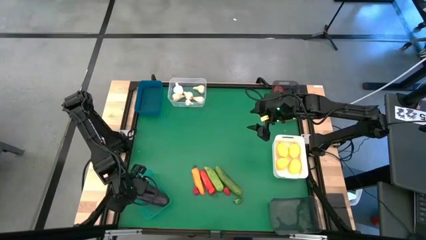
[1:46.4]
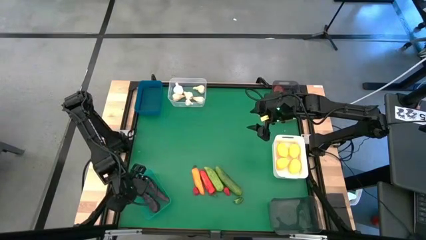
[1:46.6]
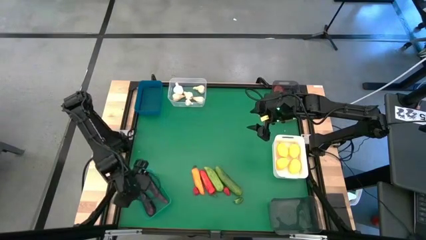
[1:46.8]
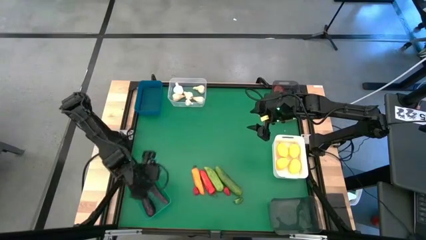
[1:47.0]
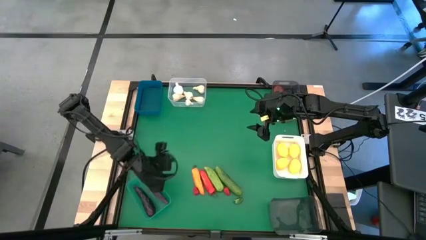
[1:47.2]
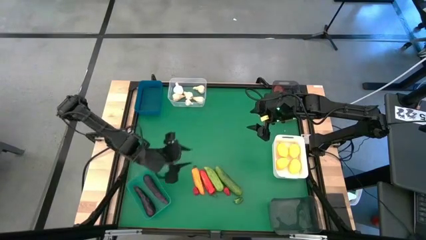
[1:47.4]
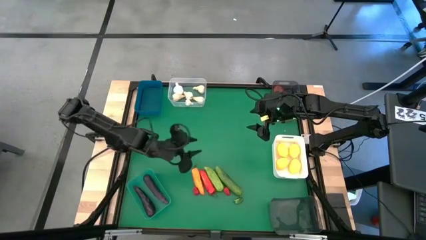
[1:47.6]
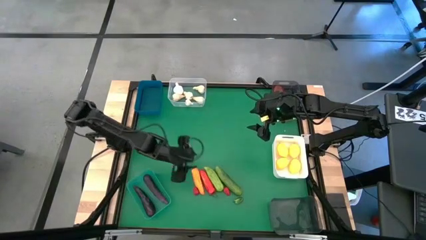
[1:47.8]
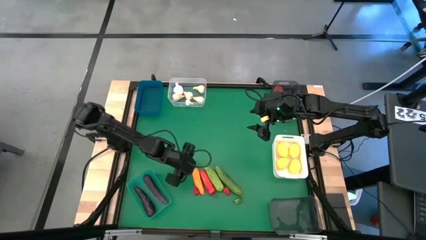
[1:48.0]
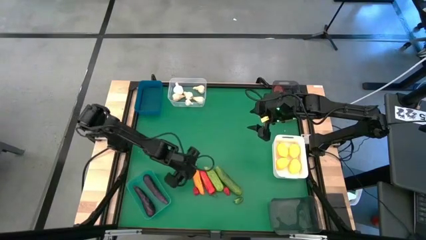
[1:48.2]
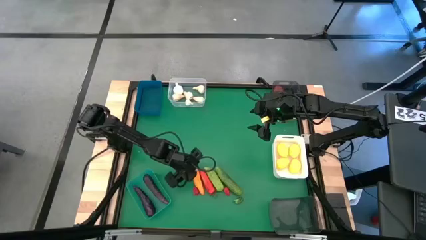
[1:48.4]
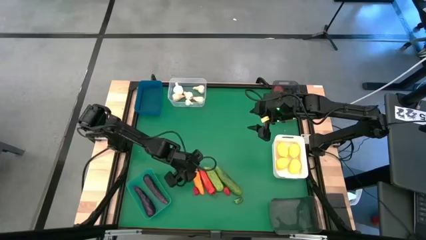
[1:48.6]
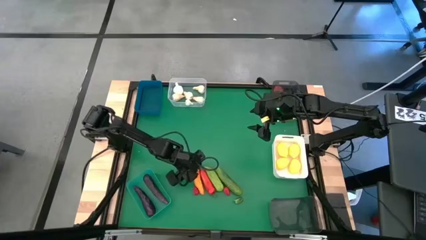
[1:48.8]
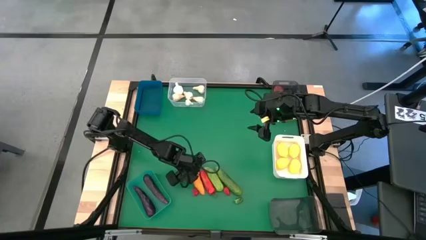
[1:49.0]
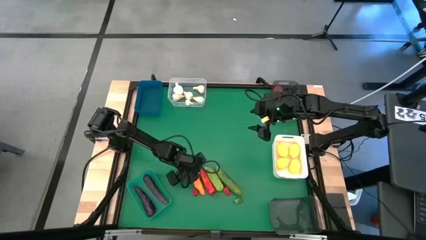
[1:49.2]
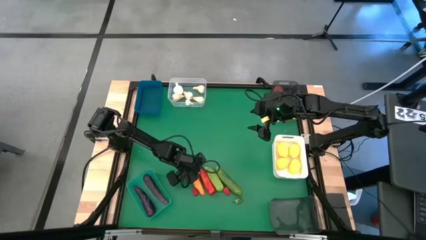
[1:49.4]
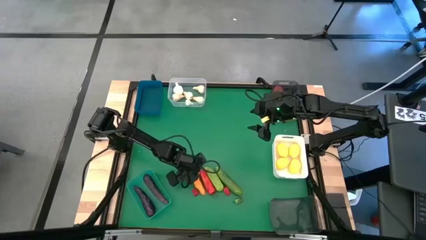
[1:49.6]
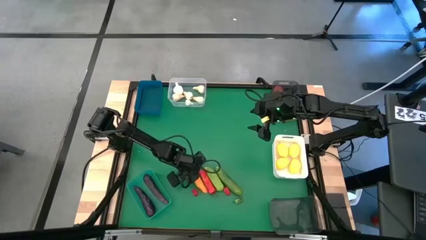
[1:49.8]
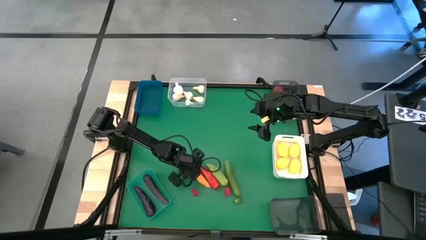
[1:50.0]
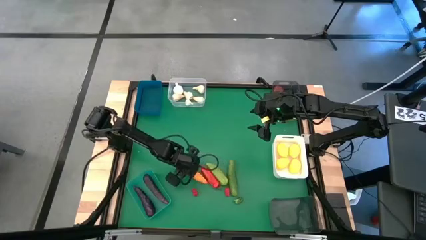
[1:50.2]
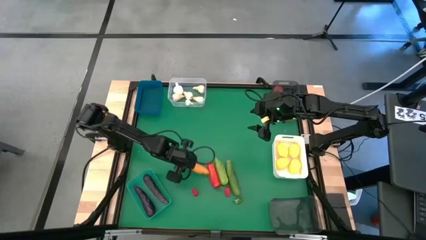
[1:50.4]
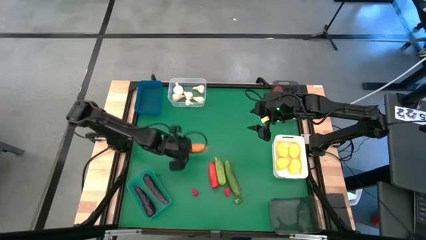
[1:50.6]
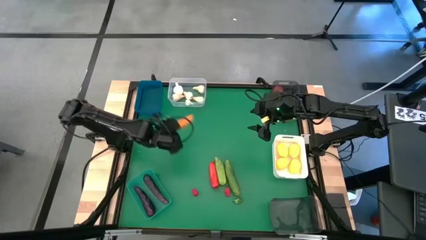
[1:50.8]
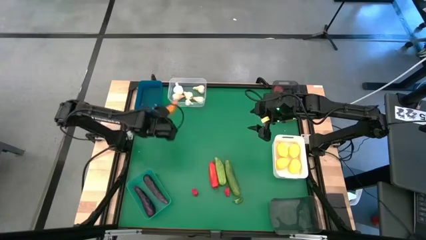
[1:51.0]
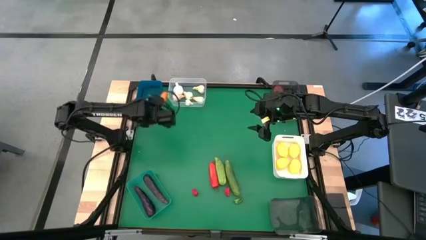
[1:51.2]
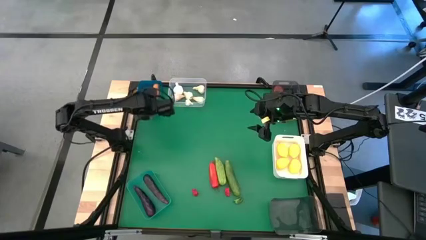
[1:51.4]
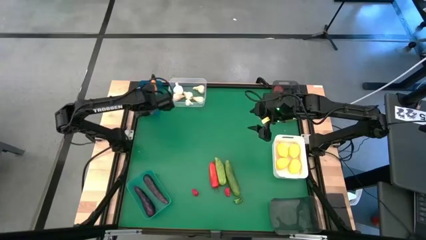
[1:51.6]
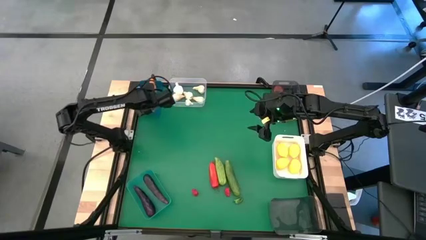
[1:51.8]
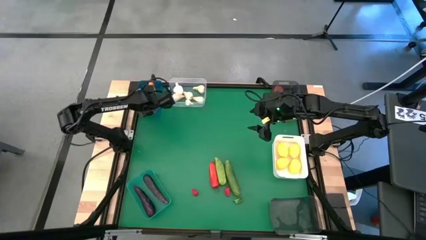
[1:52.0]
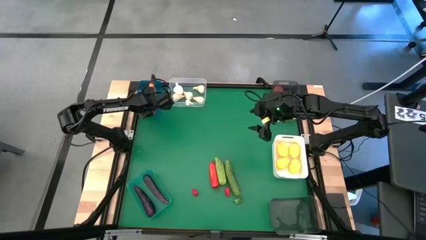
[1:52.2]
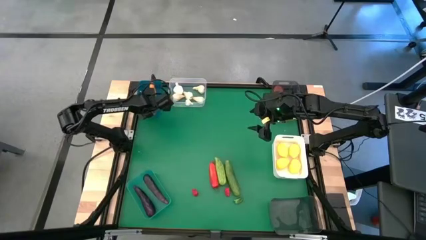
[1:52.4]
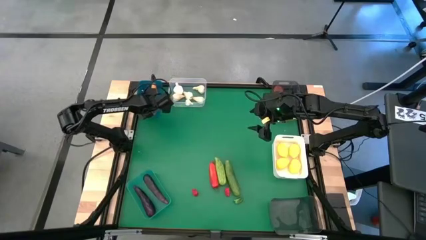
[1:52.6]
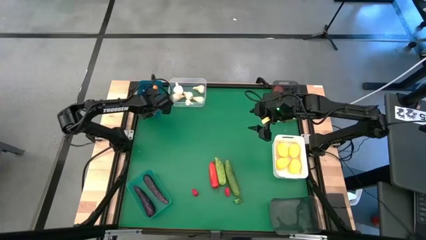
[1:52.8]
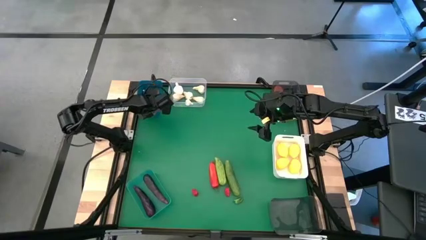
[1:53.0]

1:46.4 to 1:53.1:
Task: Sort produce into baskets
Put the orange bell pepper into the blue bin

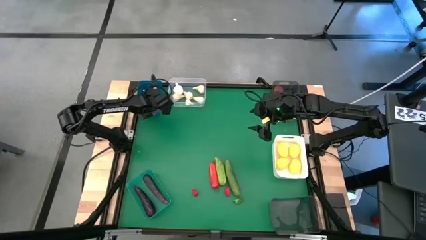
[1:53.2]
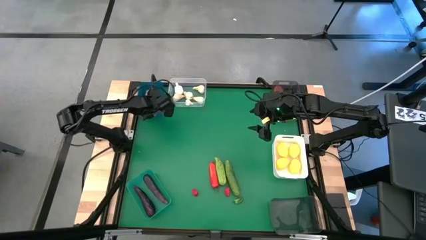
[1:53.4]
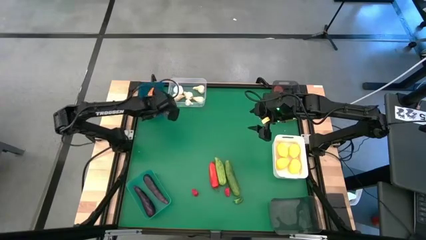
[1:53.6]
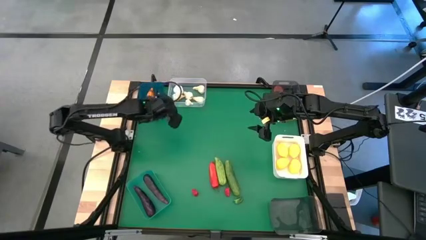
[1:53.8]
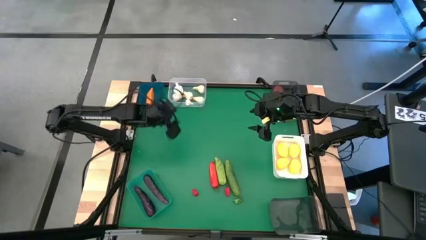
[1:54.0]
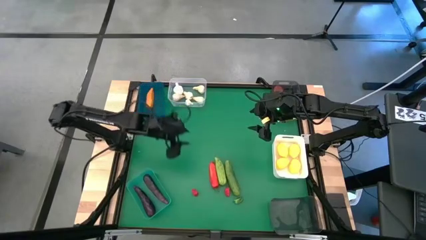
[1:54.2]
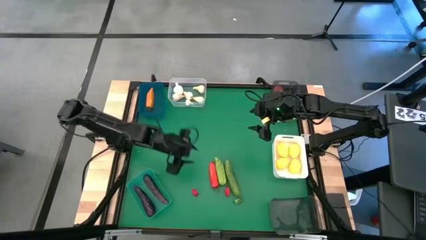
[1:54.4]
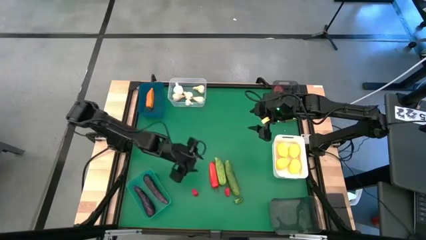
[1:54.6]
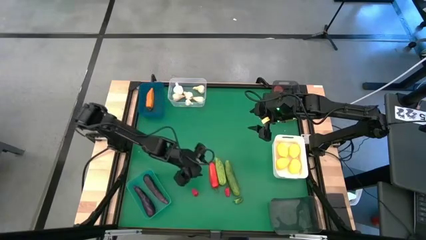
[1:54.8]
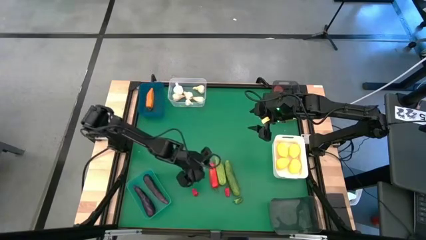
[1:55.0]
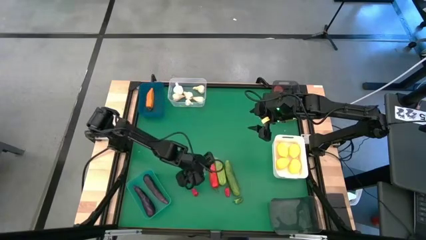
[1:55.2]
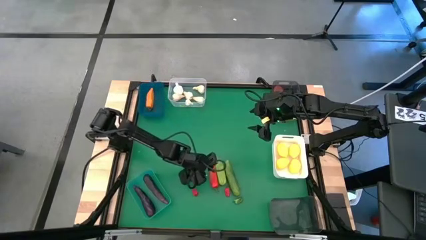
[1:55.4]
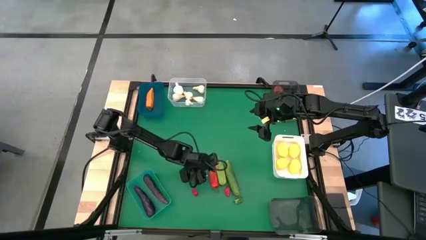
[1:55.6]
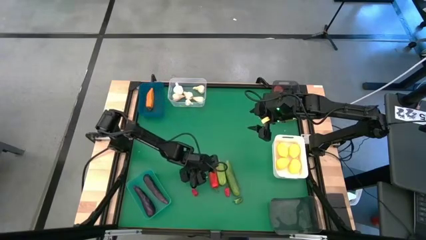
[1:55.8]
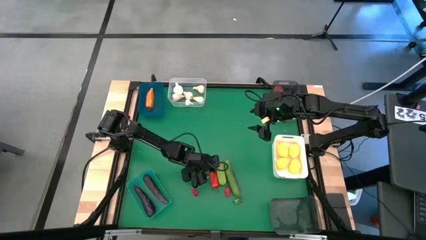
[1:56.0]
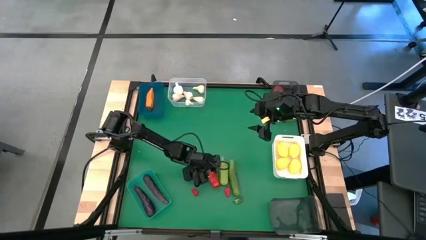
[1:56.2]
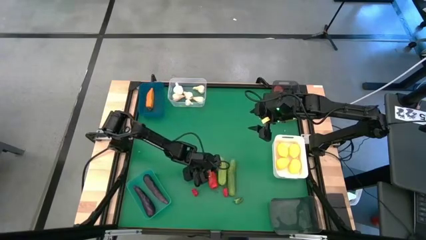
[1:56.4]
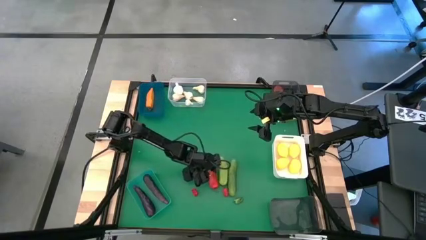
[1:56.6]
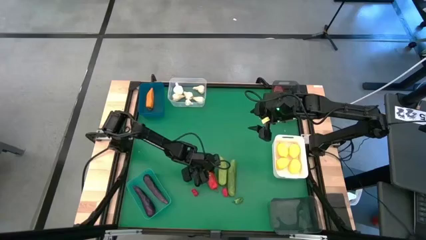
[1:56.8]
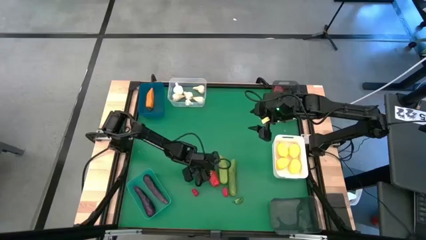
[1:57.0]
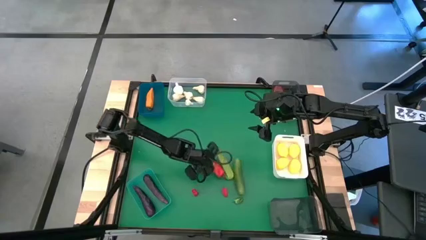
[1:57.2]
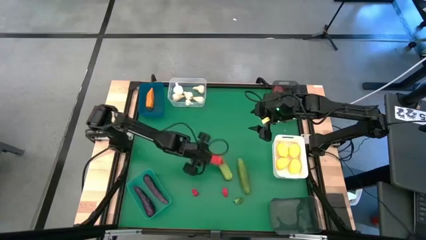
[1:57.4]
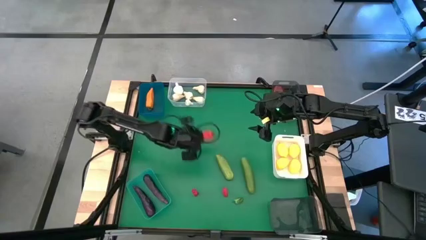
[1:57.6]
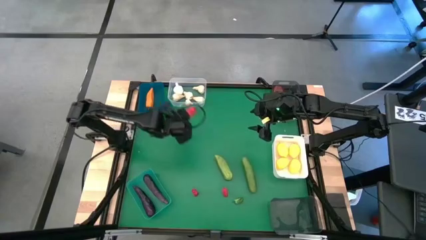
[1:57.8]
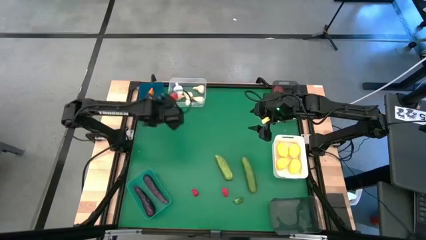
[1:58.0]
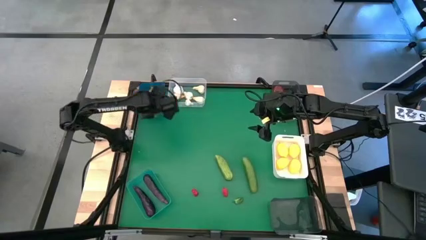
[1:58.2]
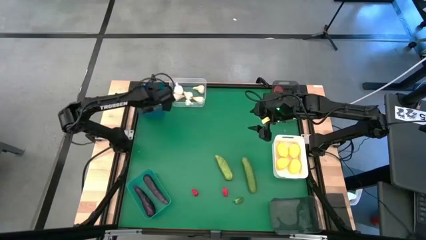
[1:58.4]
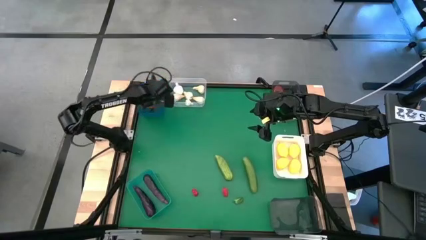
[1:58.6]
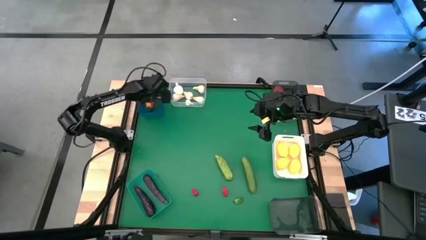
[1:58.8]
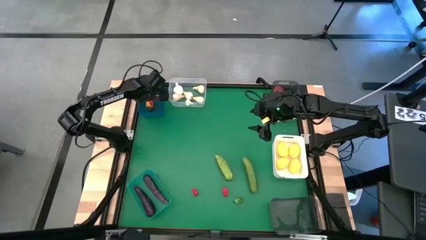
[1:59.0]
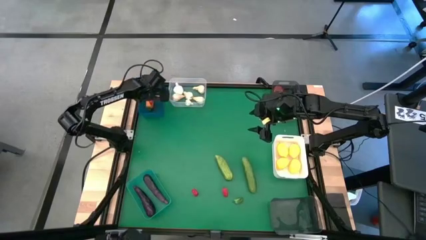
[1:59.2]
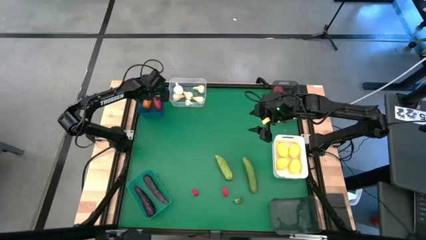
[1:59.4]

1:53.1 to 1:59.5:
Put the red bell pepper into the blue bin

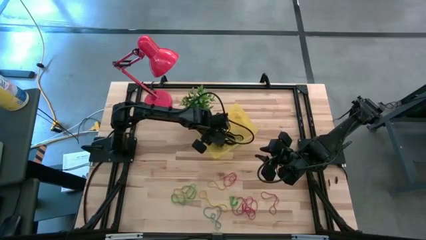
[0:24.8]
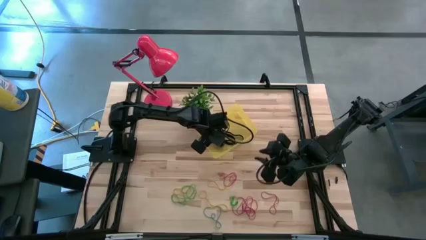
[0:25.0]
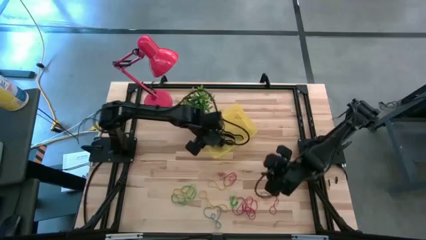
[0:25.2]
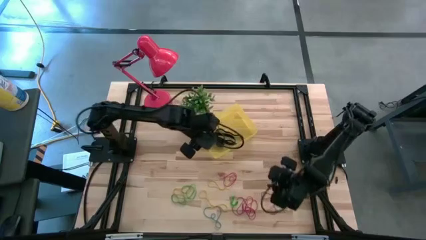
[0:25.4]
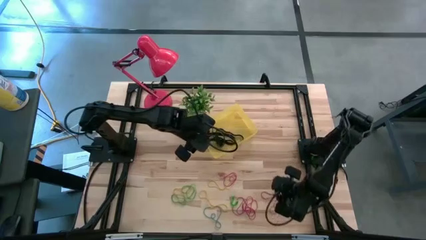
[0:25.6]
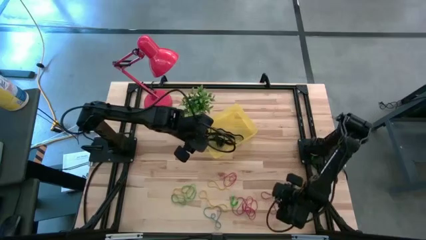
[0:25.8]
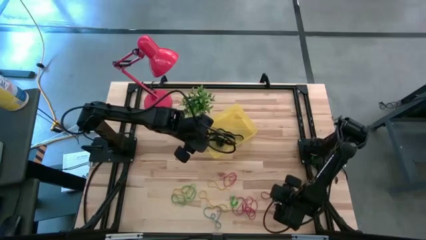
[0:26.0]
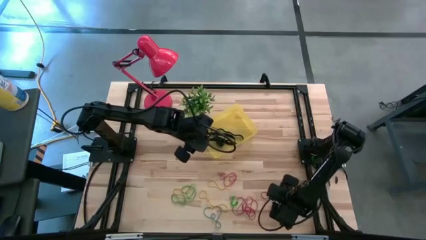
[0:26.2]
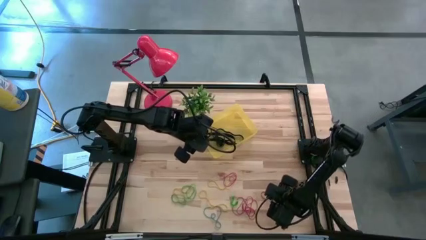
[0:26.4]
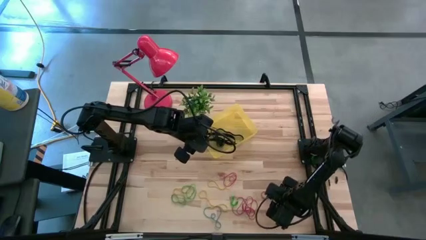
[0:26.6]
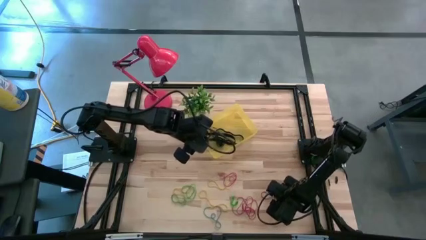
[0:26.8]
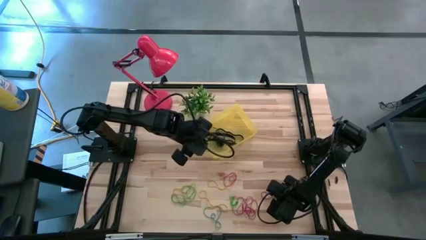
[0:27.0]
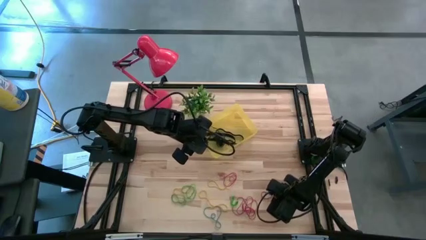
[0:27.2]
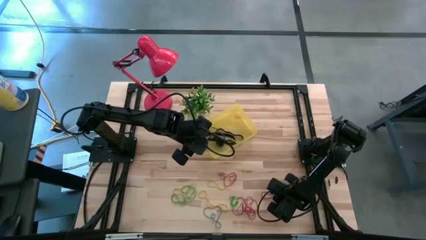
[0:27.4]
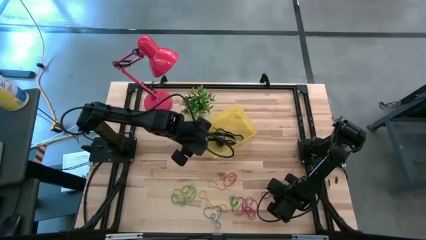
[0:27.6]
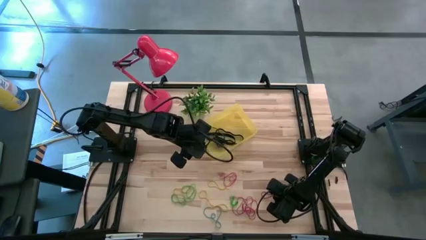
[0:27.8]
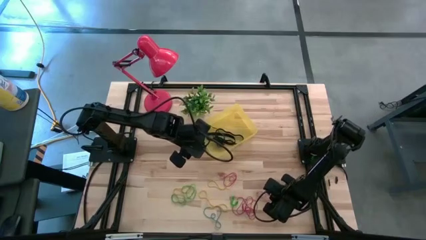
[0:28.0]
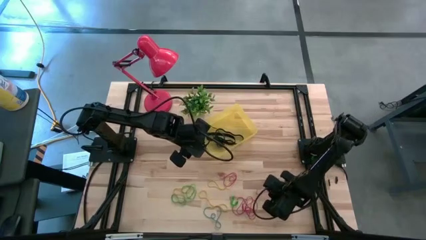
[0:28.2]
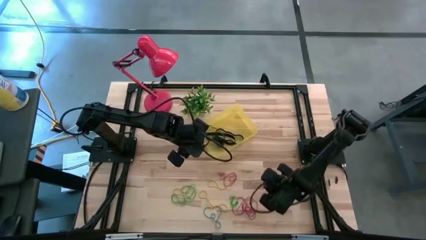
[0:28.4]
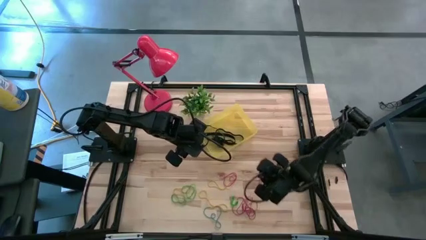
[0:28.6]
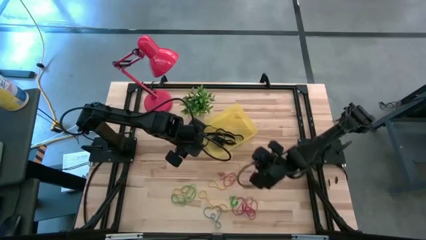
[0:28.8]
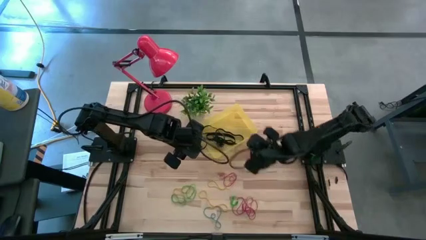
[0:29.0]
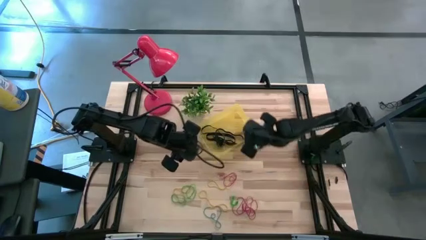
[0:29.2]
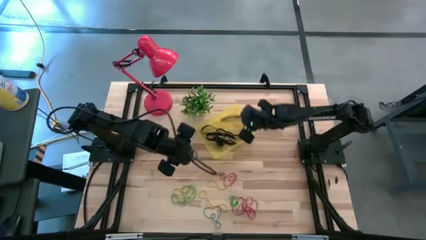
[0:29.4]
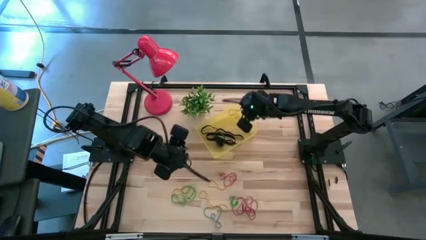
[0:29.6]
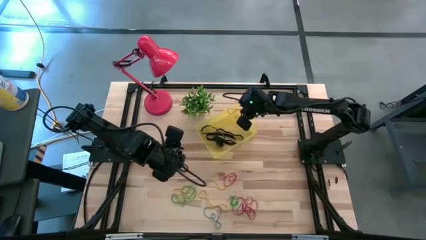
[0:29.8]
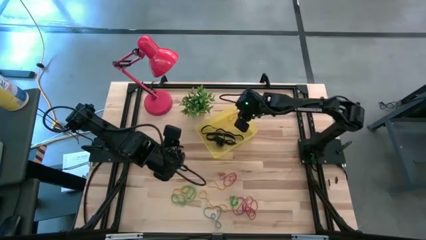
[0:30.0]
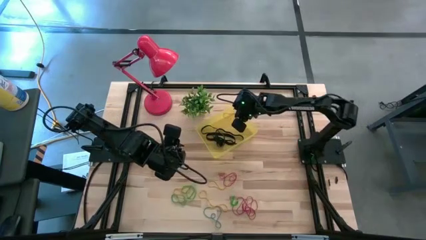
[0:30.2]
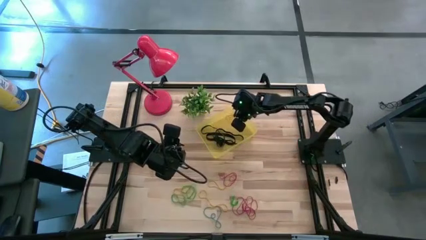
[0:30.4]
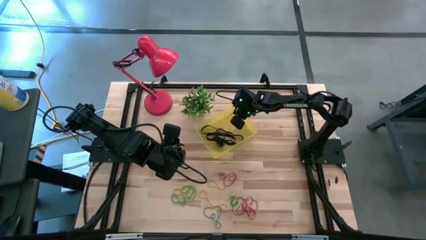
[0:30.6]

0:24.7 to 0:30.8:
Task: Pick and place rubber bands into bin
Put the red rubber band into the transparent yellow bin
